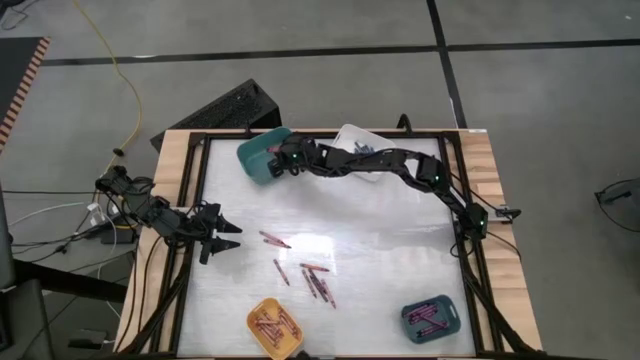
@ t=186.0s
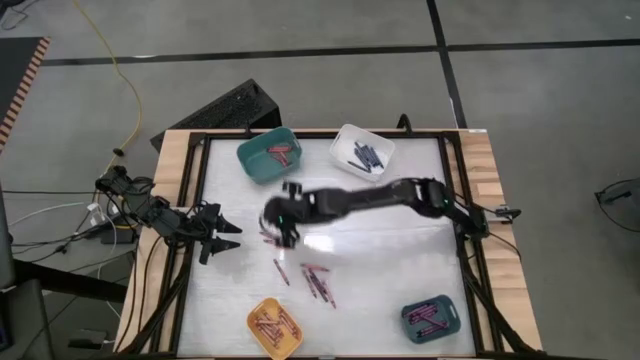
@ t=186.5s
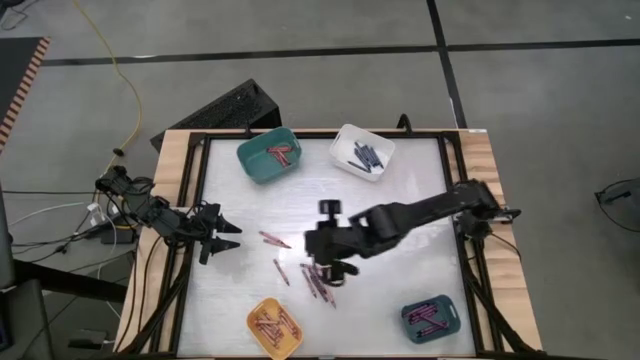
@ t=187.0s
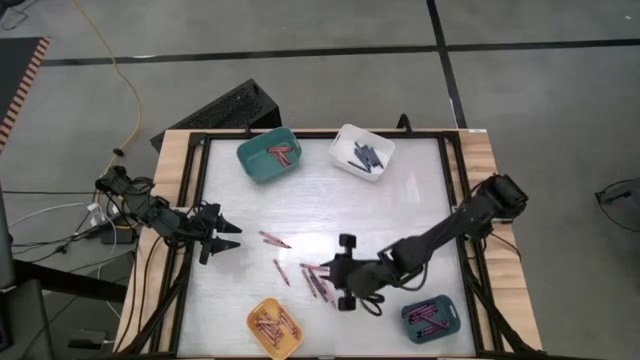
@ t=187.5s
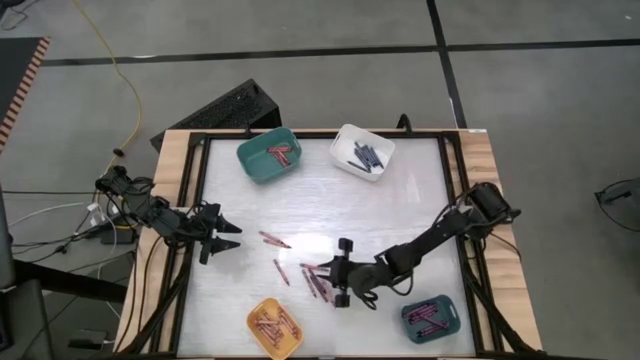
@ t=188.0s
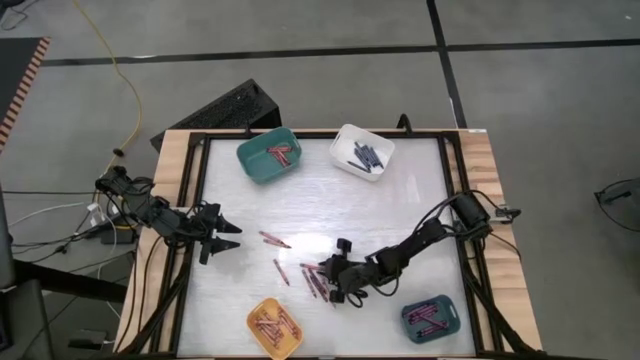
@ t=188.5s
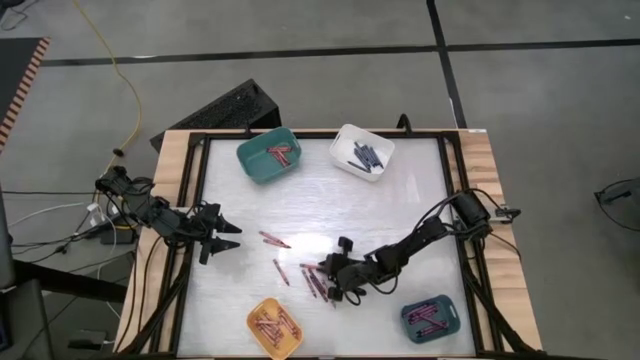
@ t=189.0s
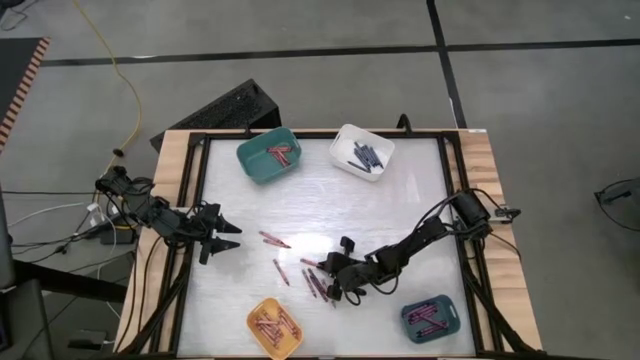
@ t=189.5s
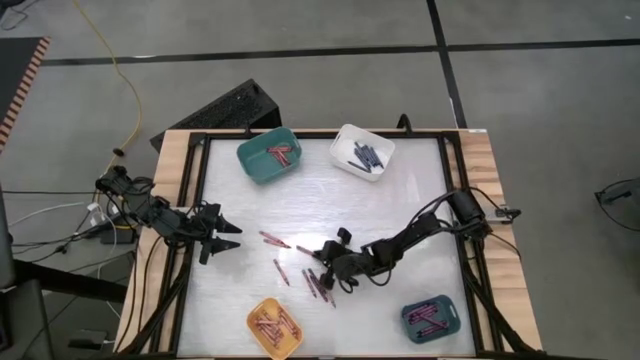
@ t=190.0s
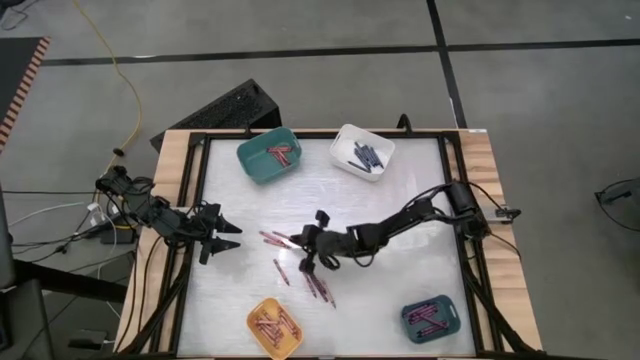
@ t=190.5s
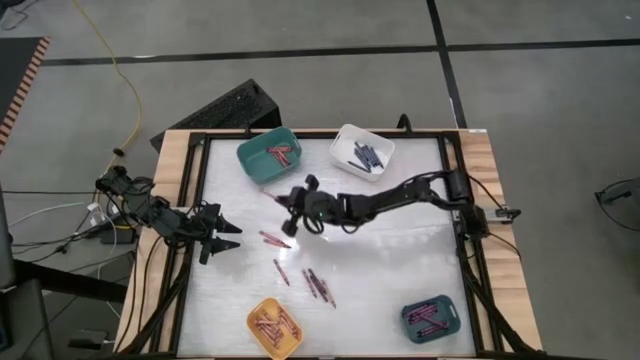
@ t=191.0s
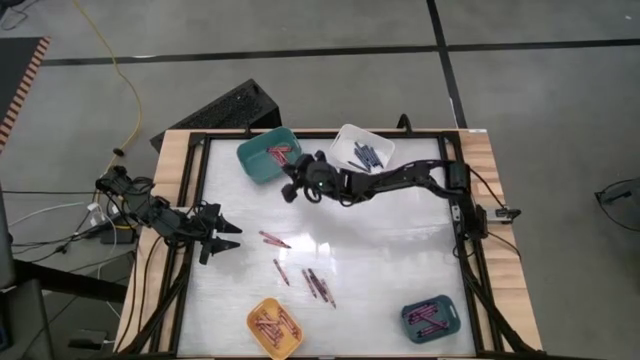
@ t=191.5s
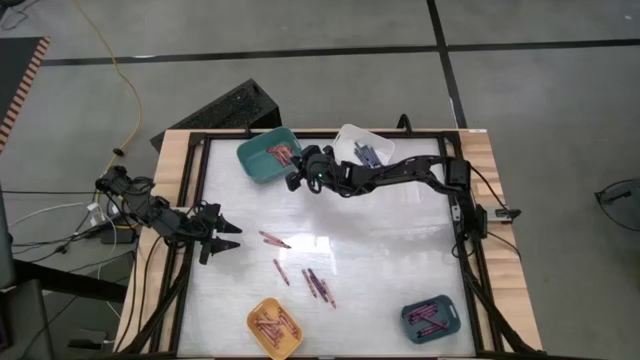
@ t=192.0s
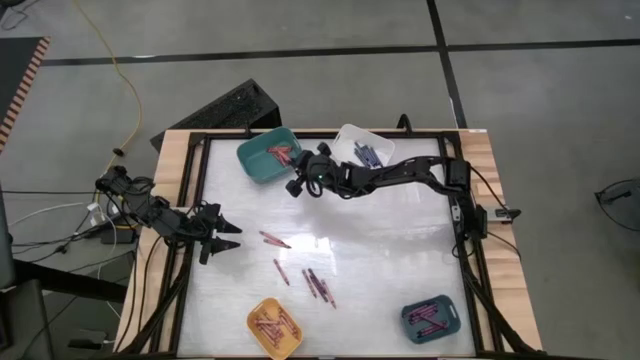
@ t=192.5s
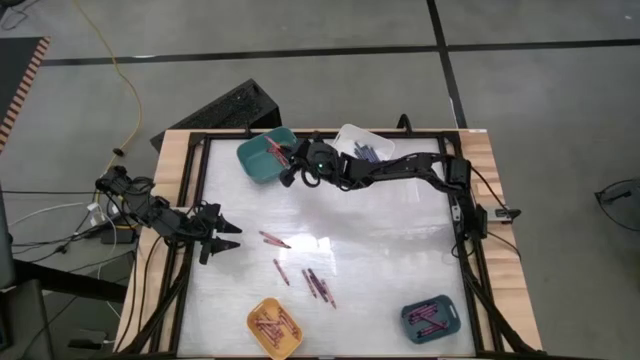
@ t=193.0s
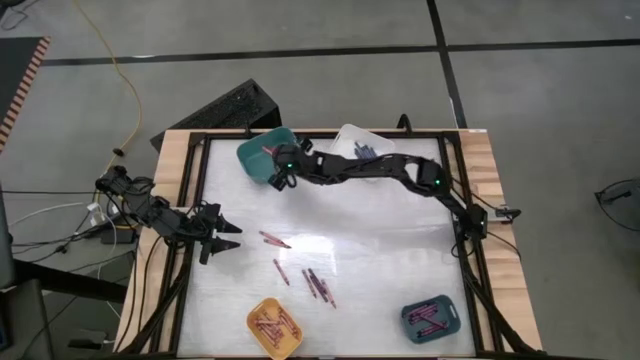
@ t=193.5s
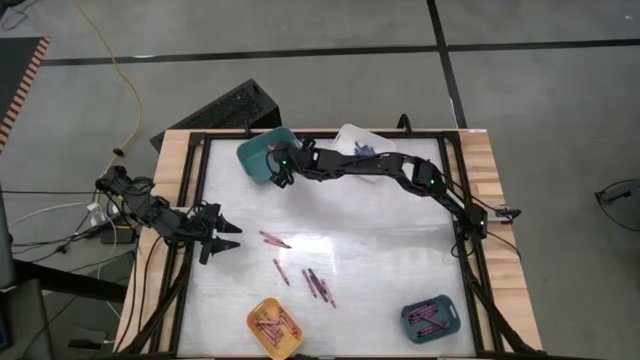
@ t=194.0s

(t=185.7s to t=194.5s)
Task: Sort crayons
Put the red crayon into the top green bin

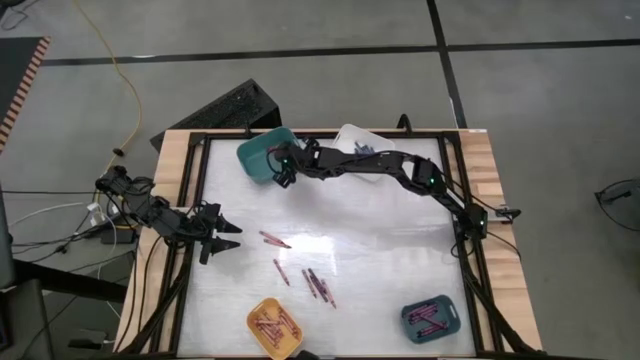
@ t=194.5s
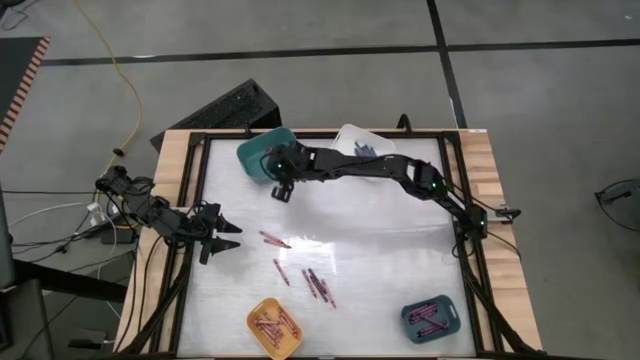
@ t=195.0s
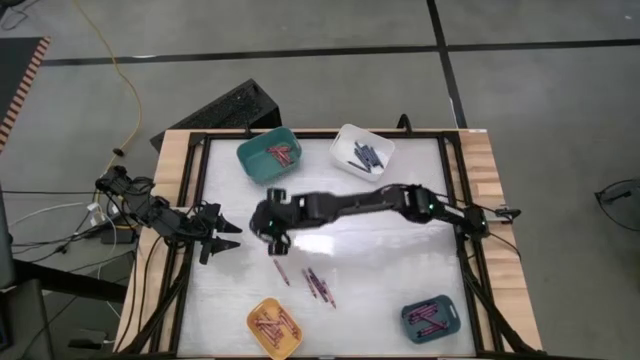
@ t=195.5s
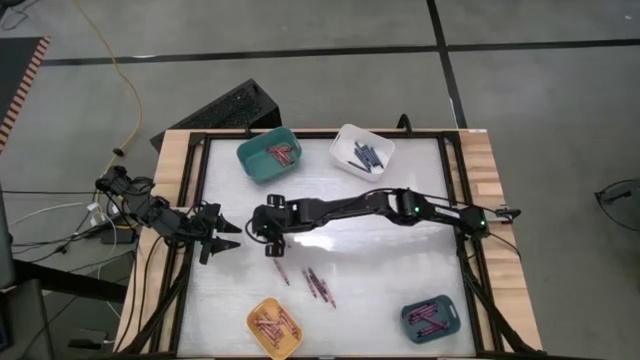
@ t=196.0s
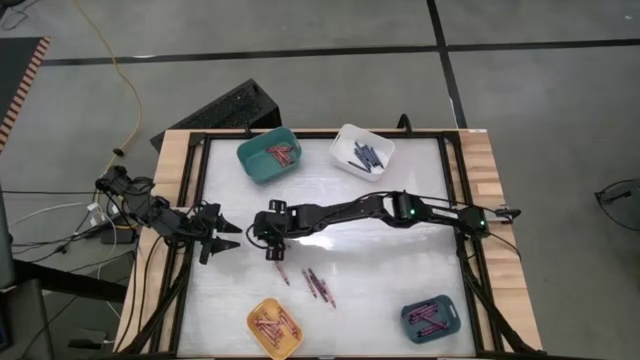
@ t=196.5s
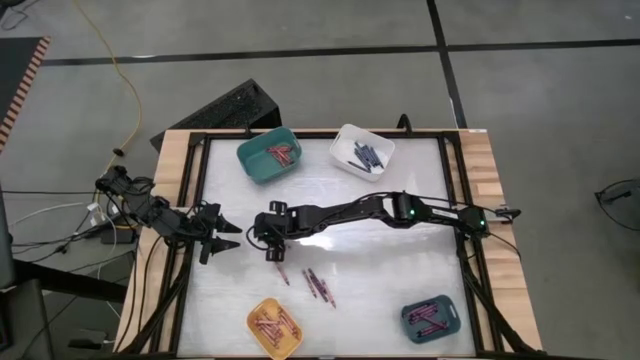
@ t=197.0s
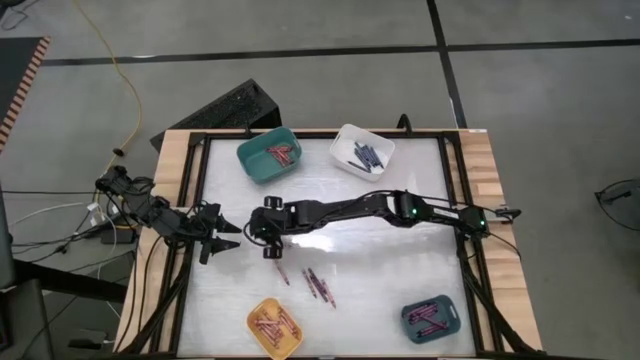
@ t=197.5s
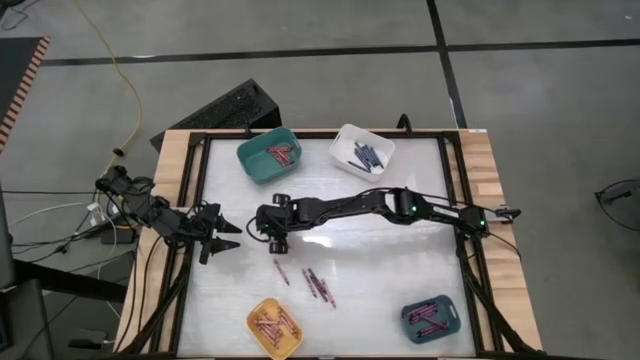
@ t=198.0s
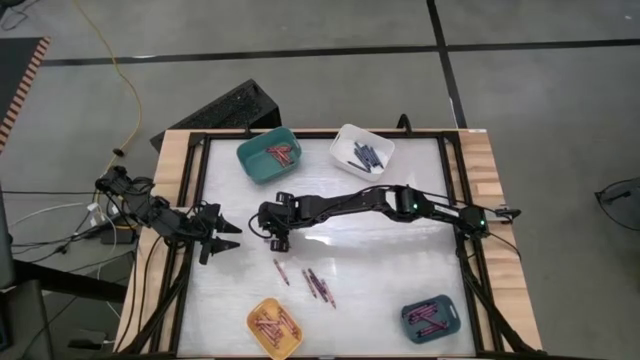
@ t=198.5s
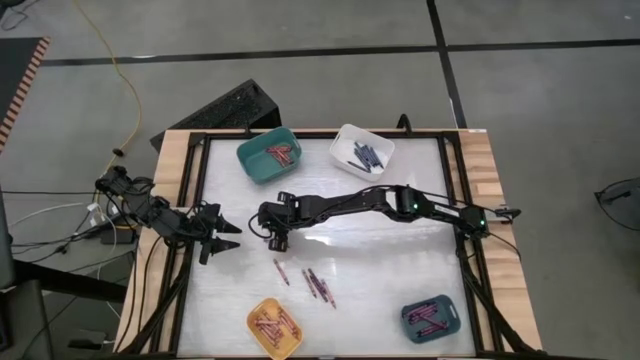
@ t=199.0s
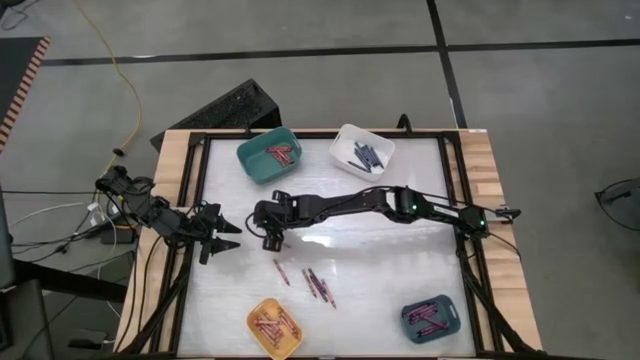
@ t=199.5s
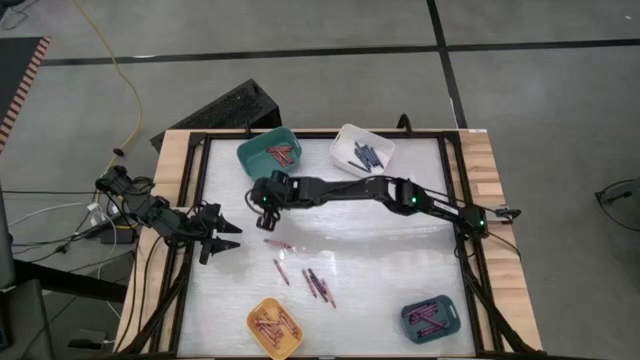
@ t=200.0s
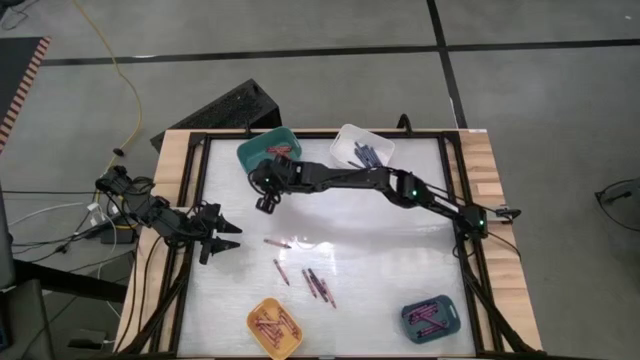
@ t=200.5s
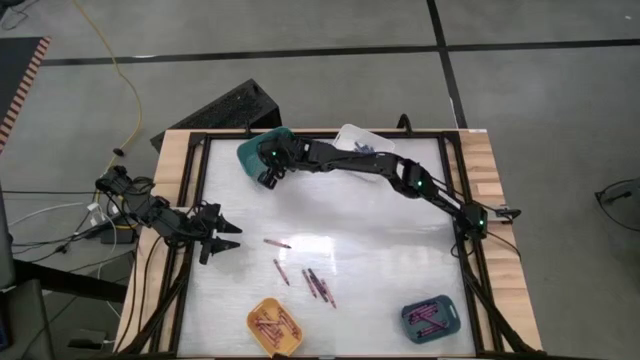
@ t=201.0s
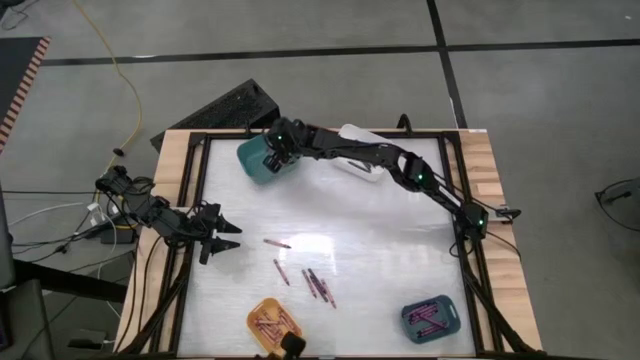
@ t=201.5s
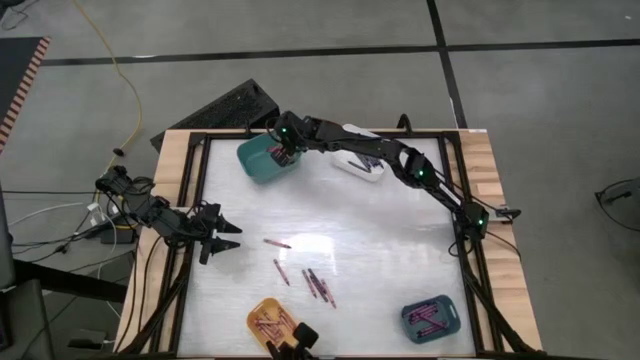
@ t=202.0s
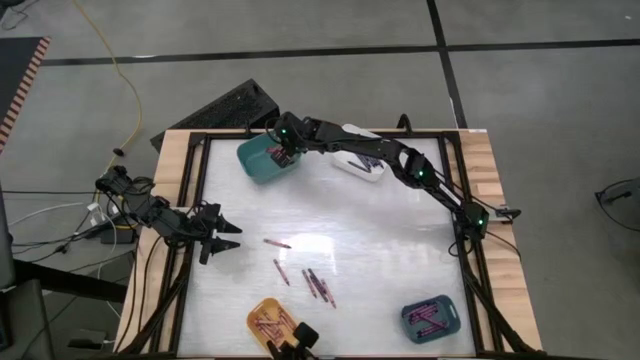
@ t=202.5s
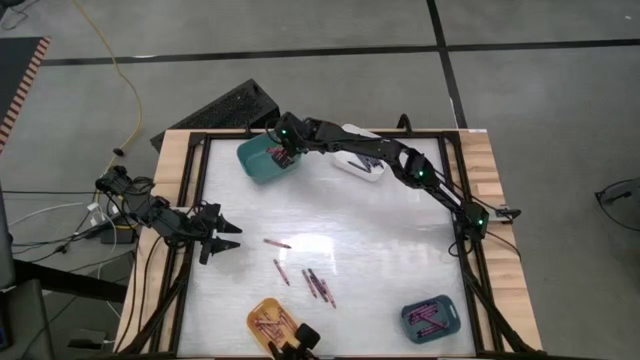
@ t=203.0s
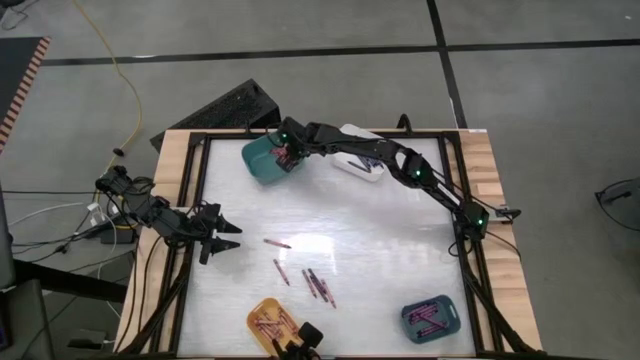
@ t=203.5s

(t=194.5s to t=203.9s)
Put the red crayon into the top green bin

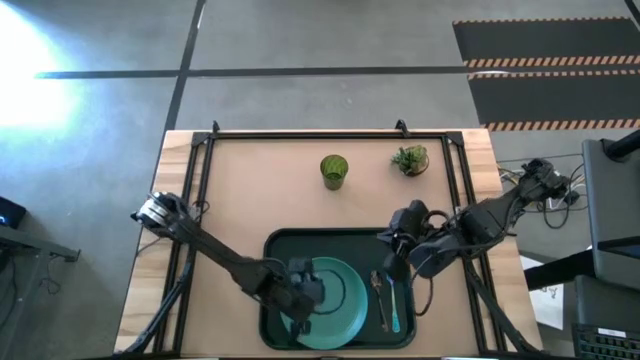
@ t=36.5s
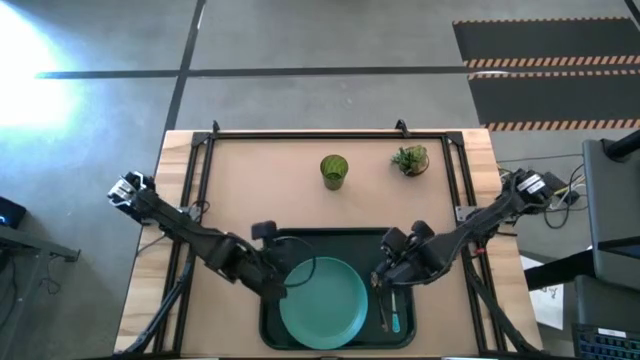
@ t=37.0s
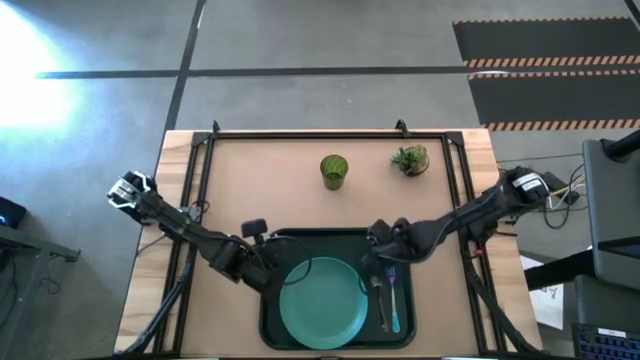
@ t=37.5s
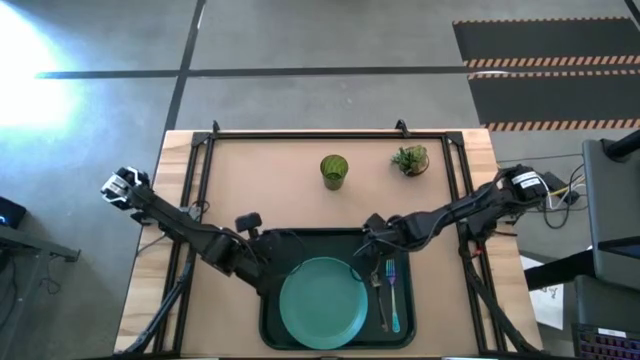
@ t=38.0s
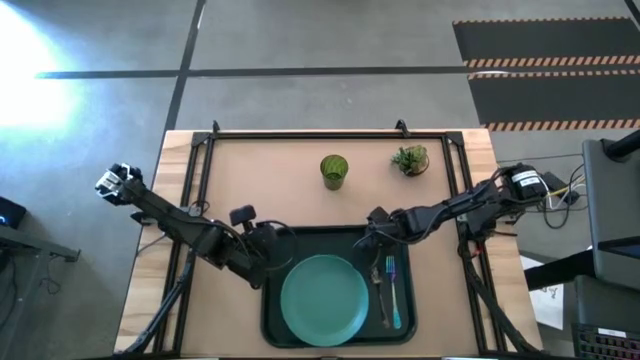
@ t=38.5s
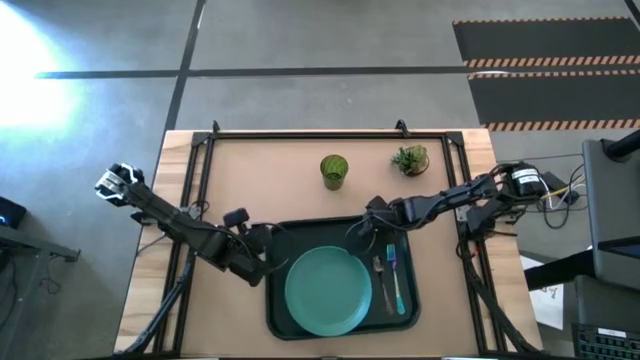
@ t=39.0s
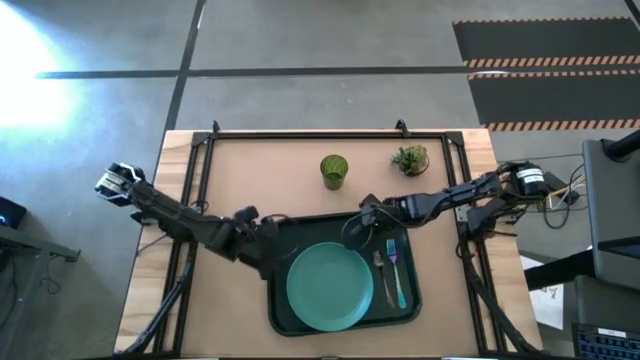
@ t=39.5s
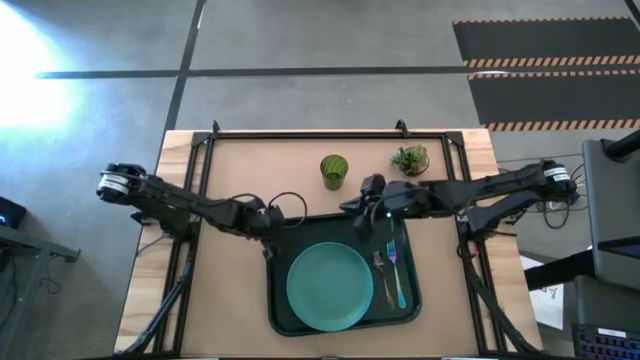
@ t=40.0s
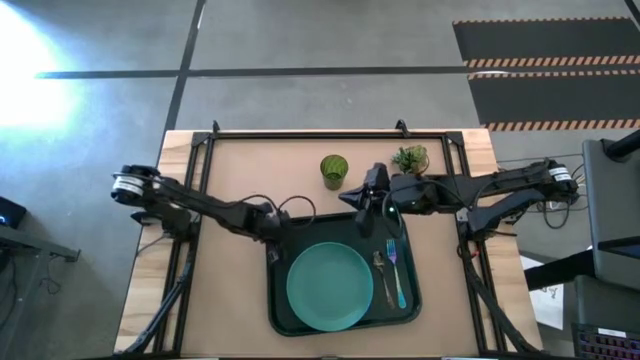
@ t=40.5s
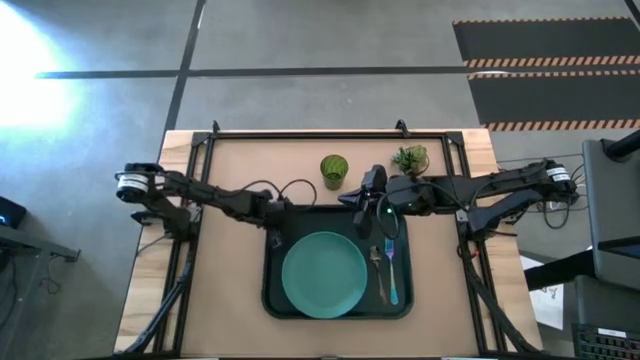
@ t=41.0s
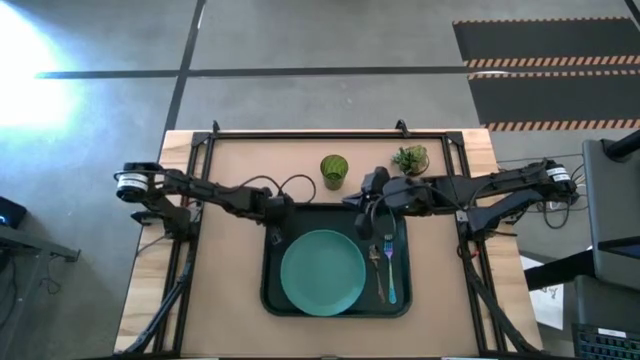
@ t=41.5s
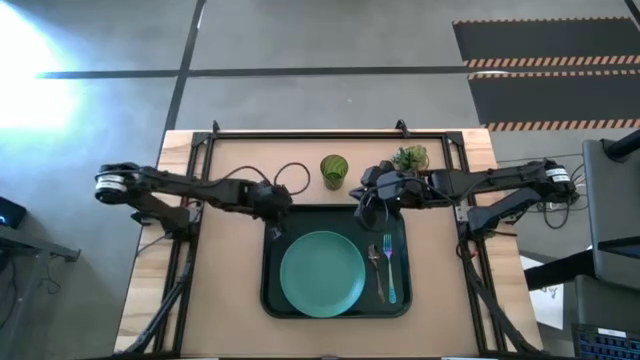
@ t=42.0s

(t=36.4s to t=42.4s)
Task: Pick and place plate/cup/fork/spoon on tray
Move the black tray to the center of the table
